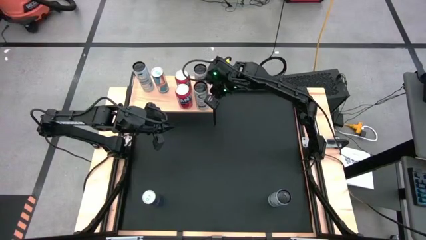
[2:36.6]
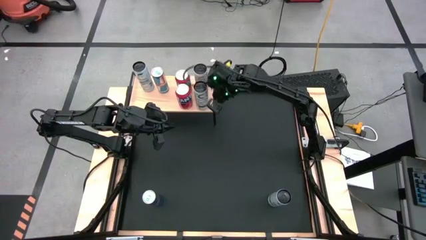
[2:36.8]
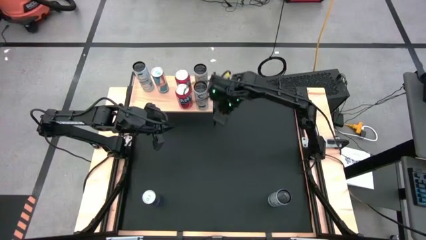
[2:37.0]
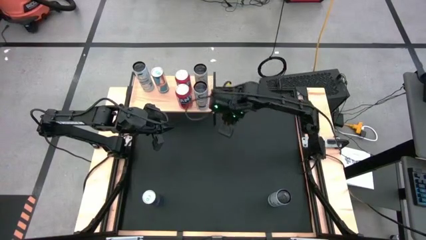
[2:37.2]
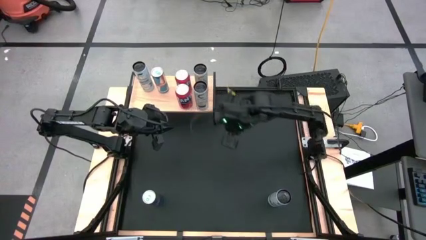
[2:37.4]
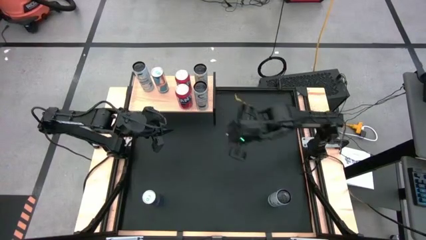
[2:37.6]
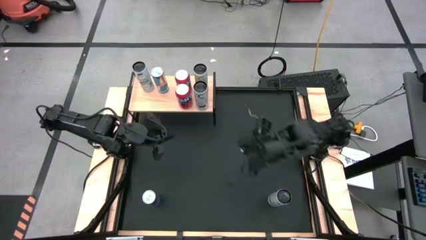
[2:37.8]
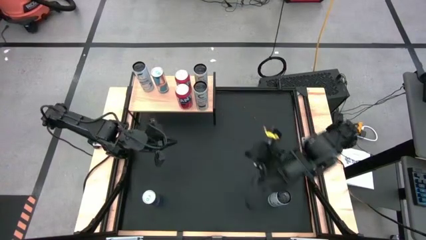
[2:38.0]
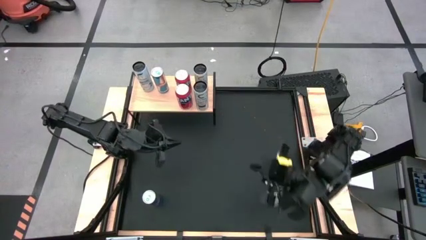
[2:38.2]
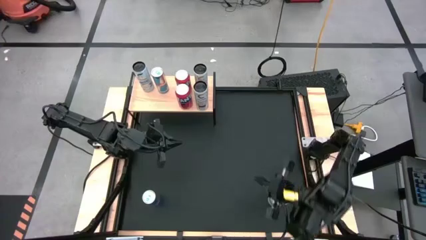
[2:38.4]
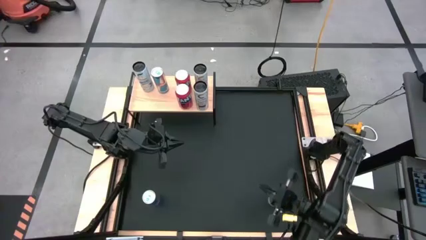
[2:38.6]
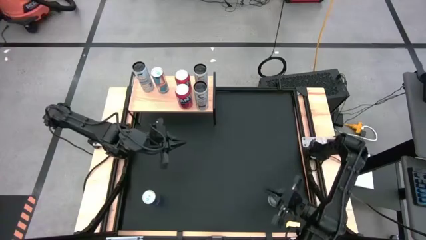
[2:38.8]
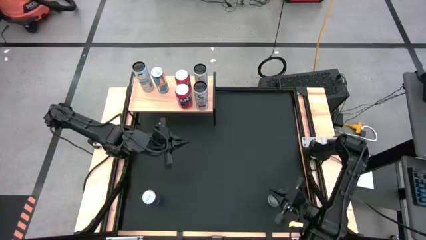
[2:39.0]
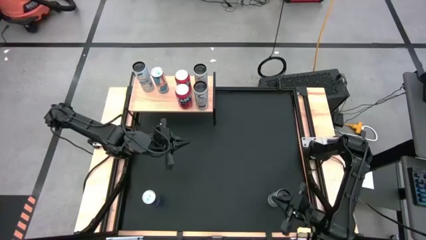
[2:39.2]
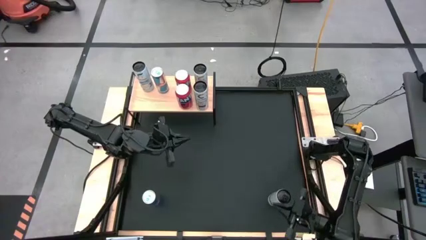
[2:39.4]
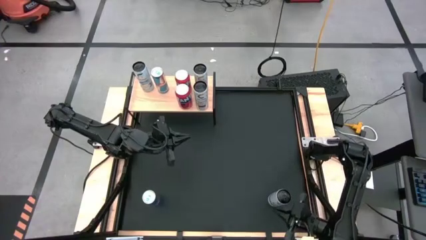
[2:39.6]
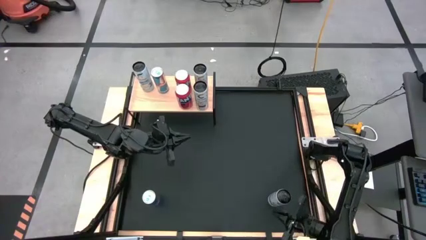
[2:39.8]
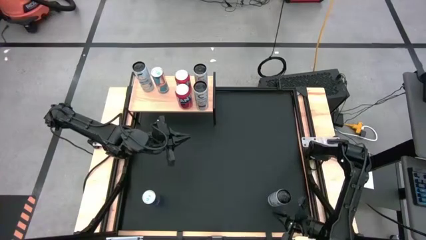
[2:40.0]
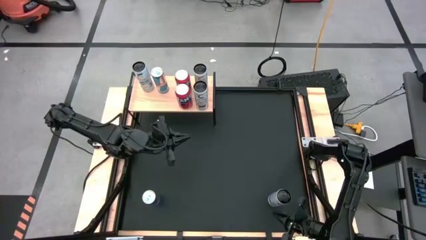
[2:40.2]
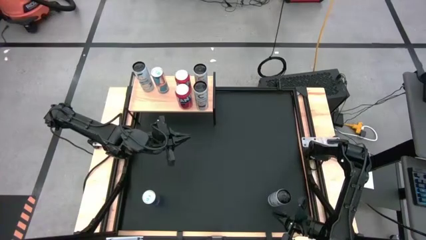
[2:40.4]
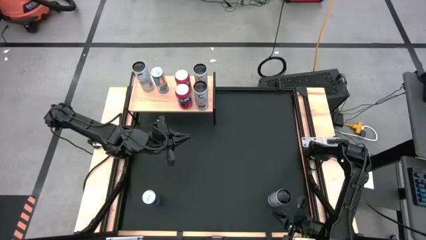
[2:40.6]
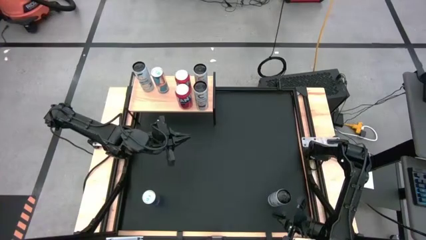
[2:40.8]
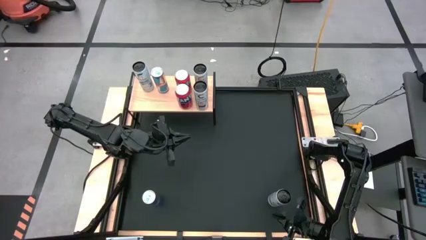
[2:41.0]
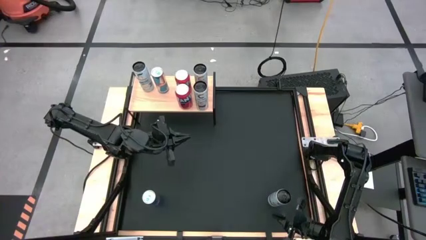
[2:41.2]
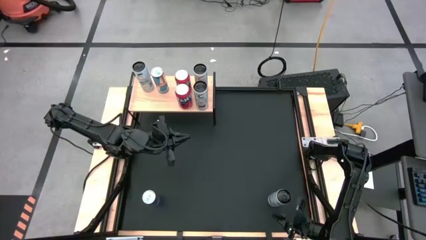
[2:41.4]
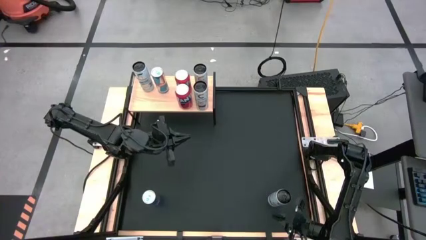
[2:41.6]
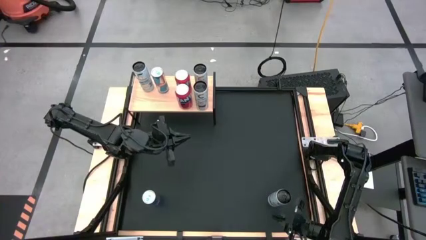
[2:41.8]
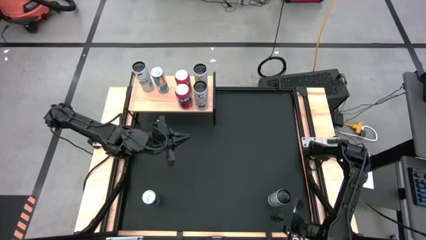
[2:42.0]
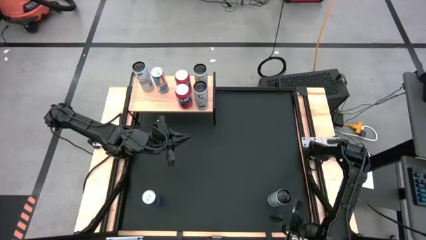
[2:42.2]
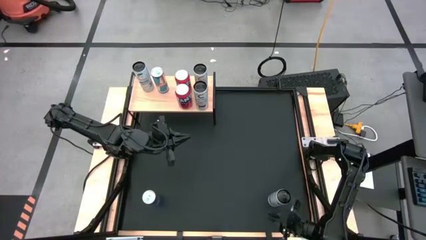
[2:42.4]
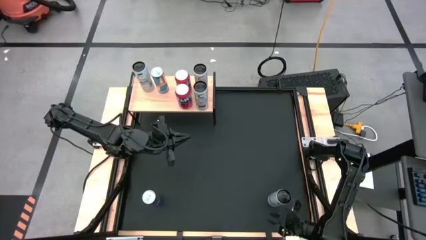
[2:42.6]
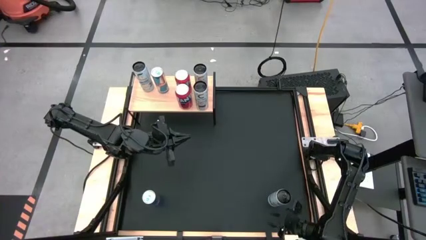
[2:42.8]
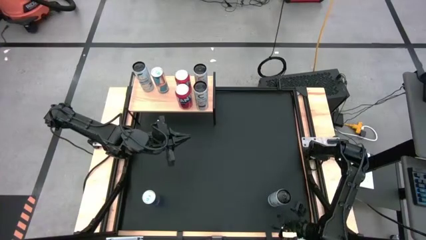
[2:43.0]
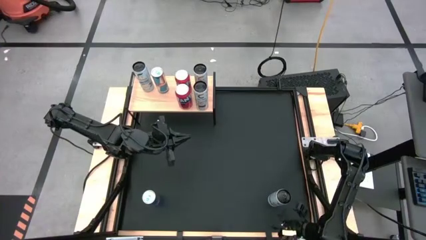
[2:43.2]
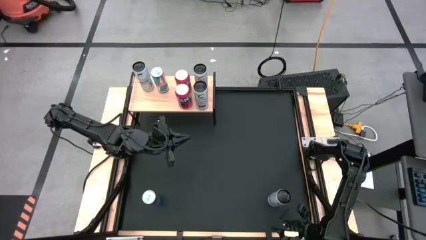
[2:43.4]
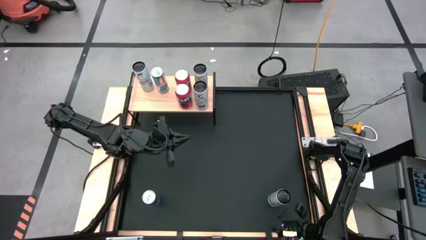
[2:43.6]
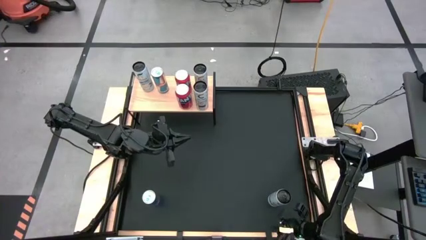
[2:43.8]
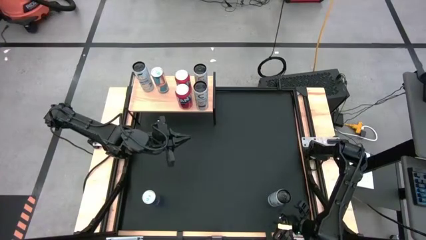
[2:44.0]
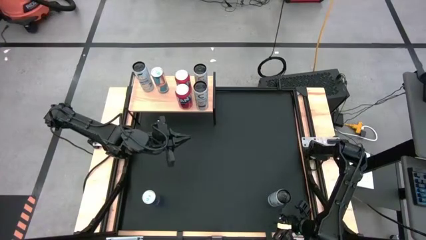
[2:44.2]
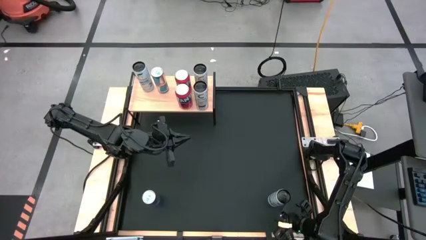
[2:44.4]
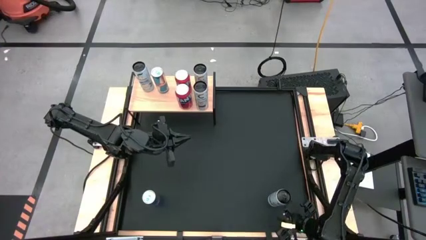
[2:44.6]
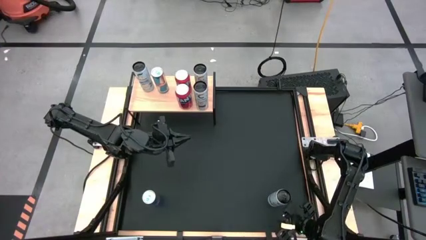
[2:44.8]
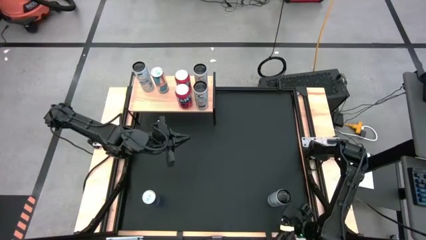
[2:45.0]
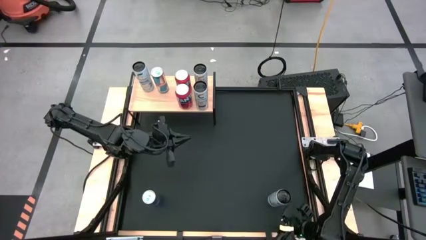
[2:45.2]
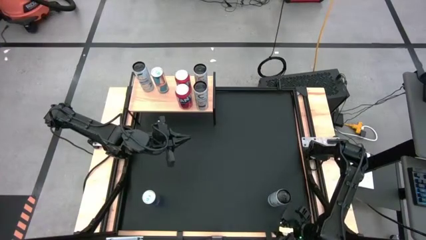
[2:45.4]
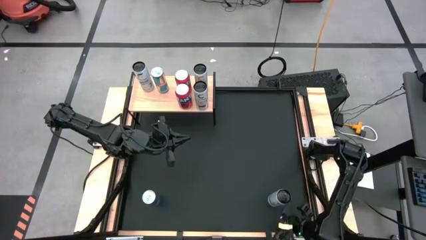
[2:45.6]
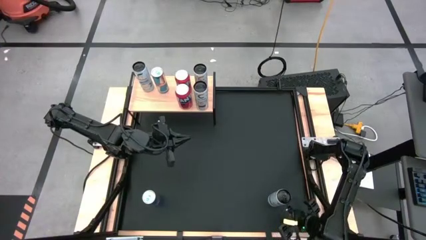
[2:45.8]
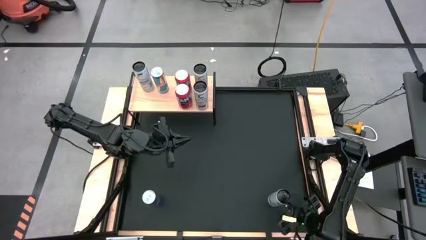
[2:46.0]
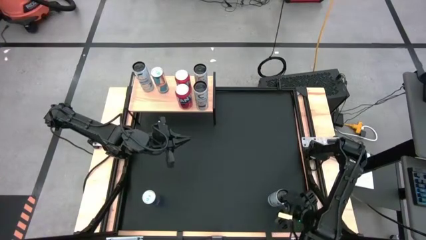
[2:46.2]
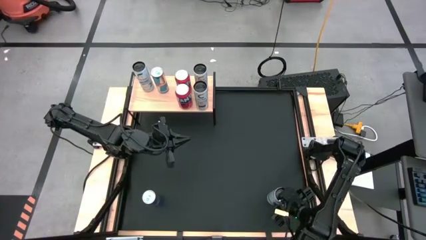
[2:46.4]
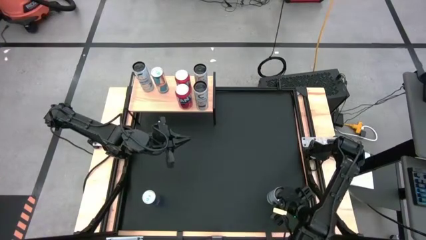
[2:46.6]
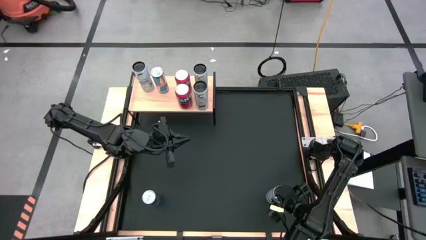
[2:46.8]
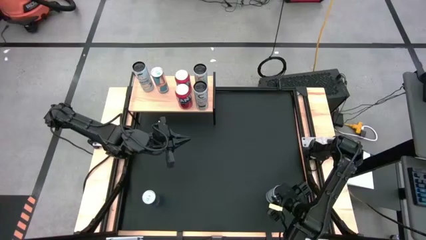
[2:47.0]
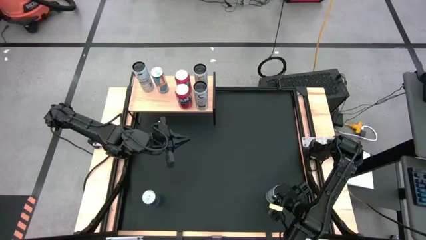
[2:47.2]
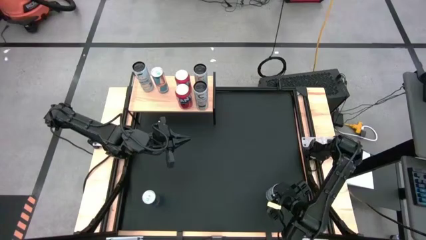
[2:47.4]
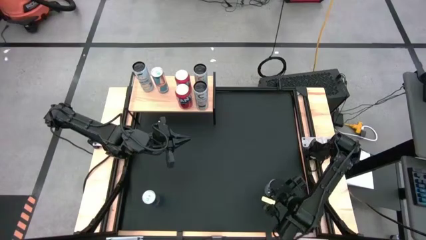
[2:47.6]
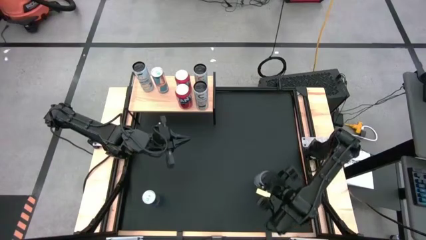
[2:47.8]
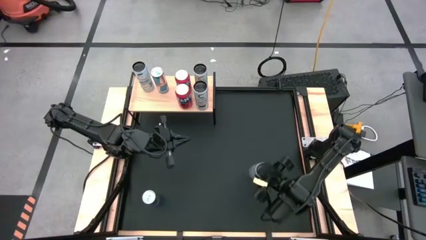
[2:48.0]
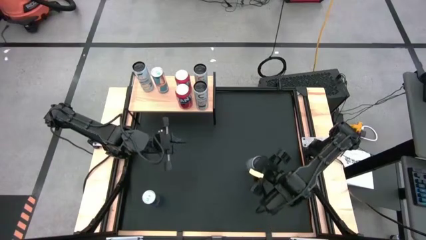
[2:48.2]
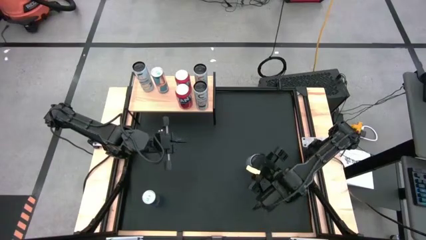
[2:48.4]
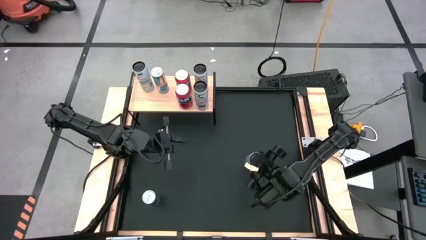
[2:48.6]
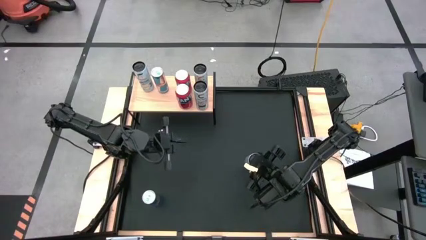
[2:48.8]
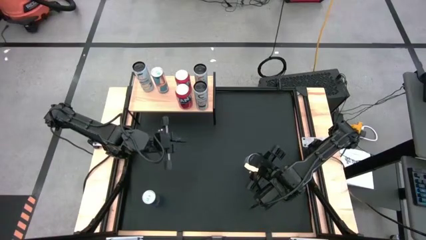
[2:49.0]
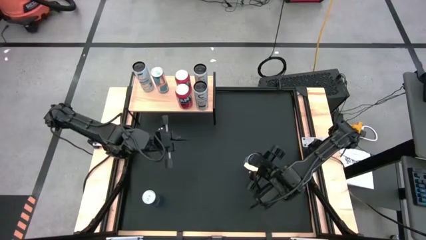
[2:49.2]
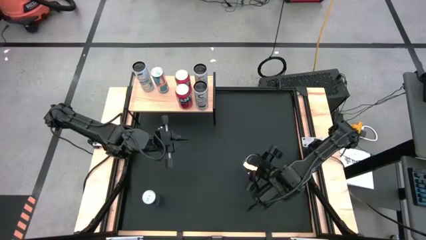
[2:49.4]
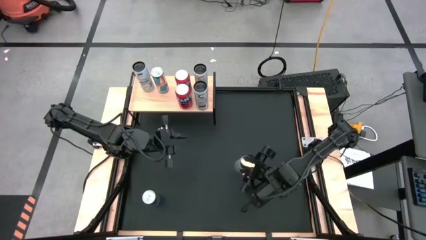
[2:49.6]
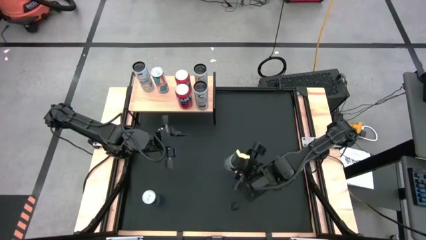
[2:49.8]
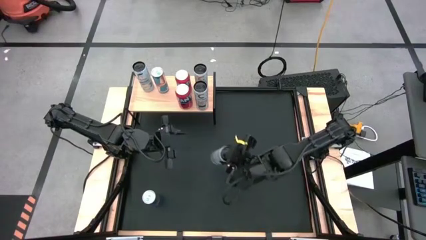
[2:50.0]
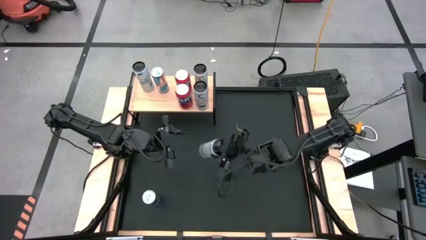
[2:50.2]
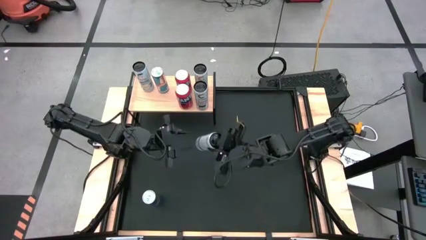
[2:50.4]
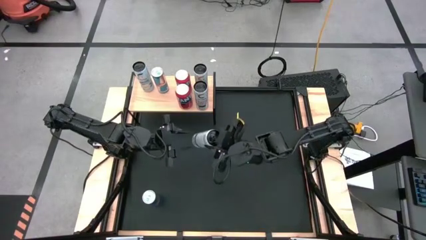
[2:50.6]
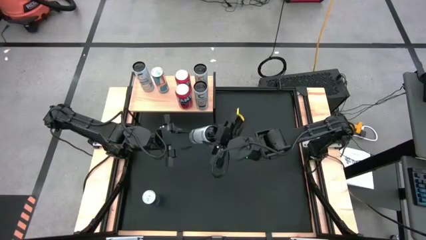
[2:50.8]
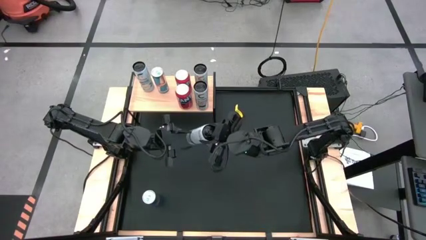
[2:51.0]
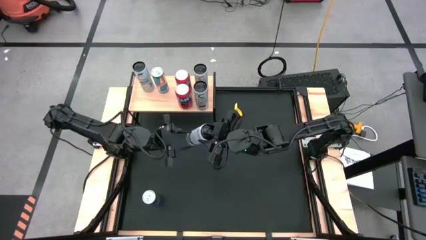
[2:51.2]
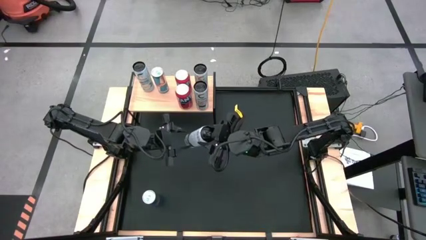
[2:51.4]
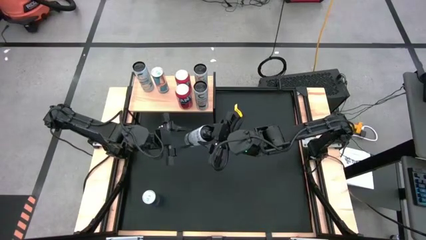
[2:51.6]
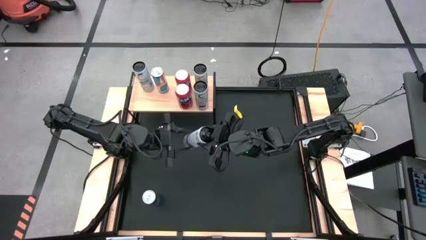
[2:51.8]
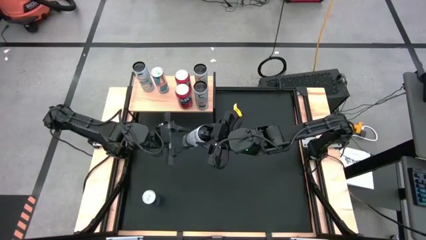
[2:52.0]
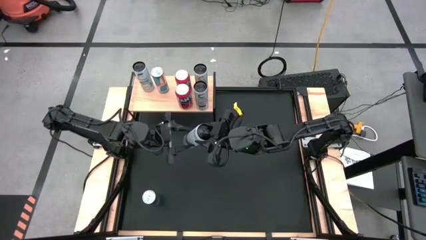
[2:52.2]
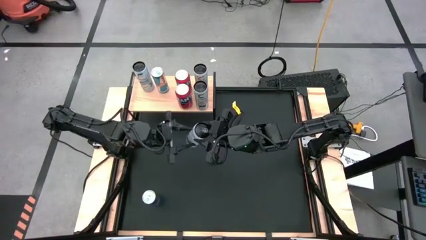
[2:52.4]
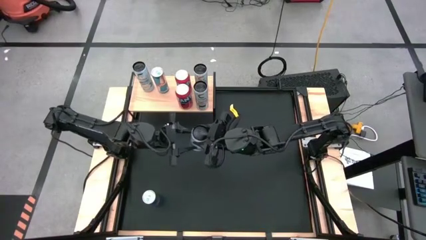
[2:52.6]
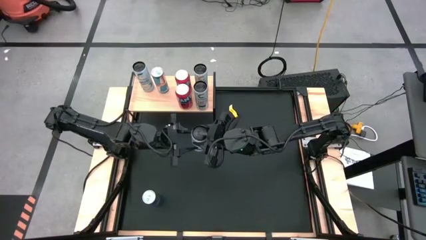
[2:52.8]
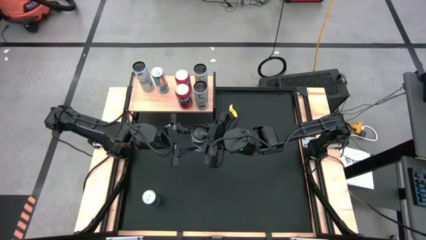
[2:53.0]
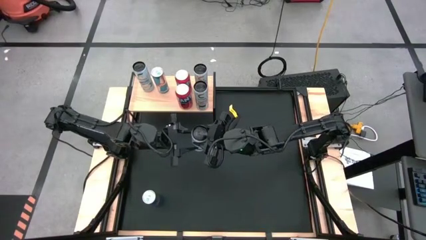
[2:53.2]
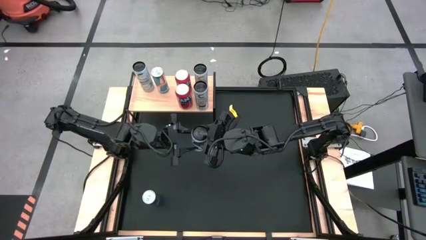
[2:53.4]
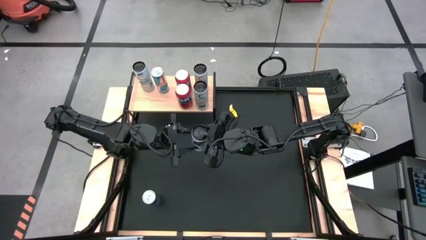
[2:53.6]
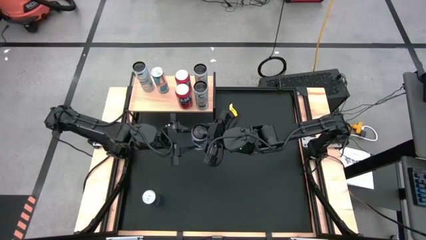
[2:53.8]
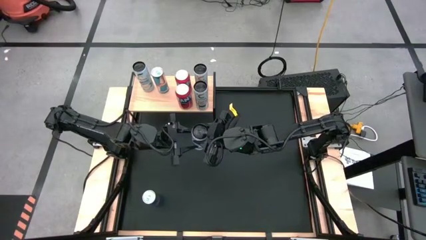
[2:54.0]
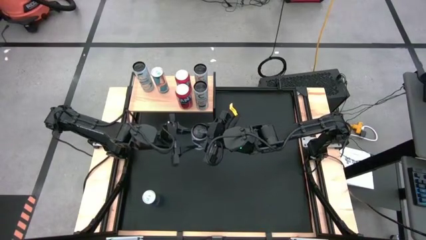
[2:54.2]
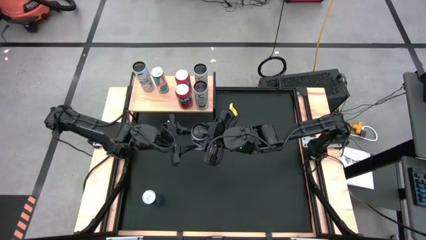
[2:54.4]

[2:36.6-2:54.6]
Task: Place canned beverage on shelf
Put the white-blue soda can aligned with the other white-blue soda can on the shelf
